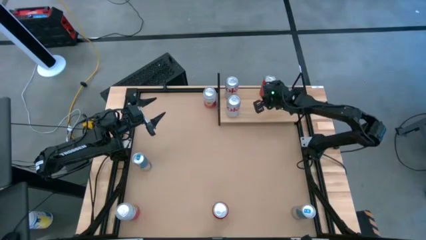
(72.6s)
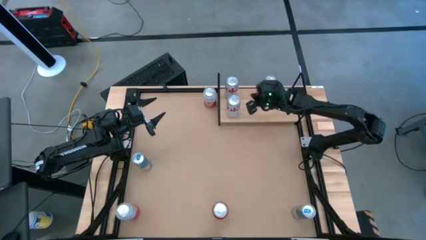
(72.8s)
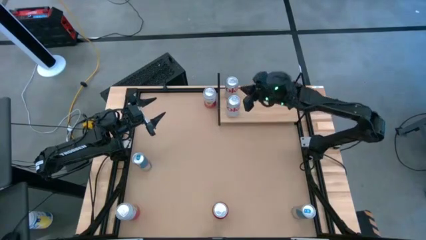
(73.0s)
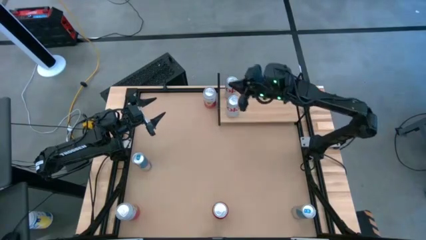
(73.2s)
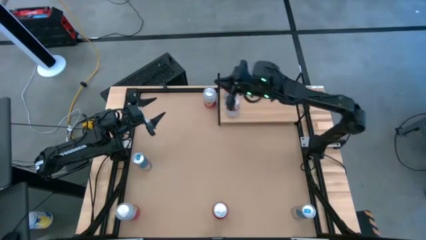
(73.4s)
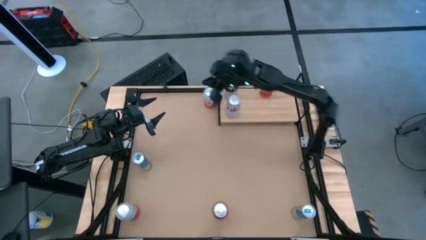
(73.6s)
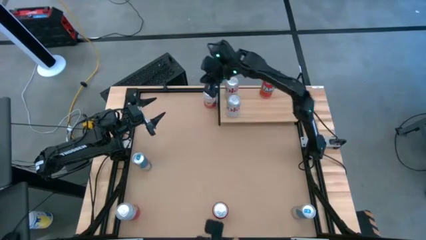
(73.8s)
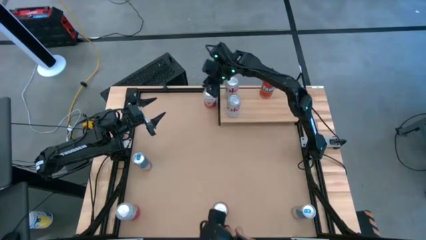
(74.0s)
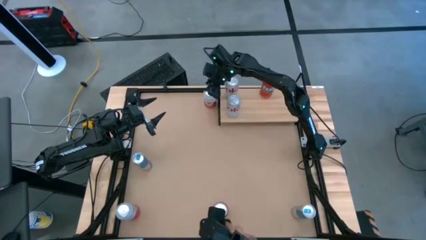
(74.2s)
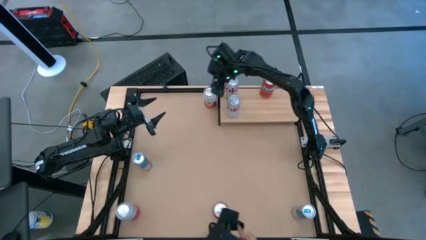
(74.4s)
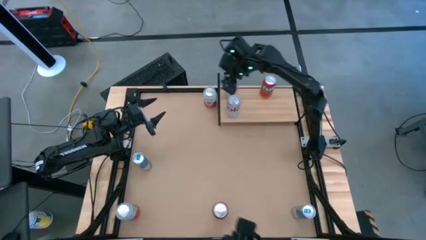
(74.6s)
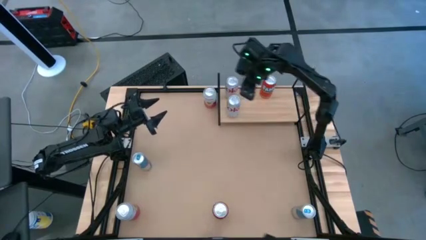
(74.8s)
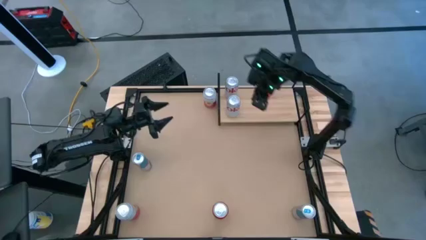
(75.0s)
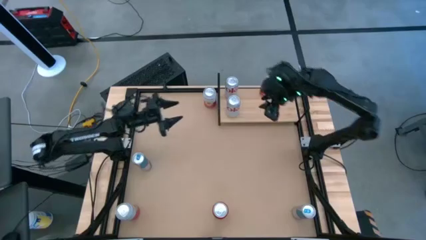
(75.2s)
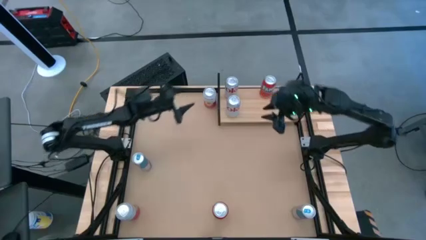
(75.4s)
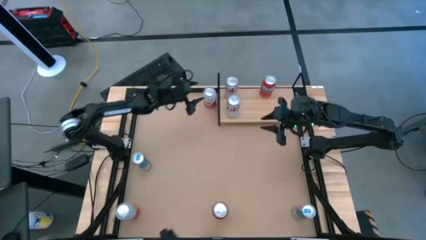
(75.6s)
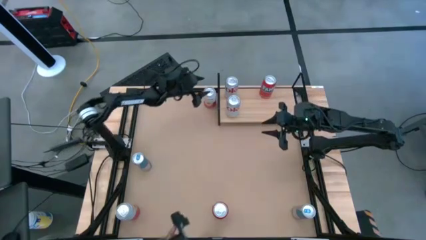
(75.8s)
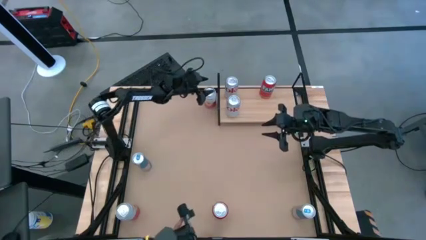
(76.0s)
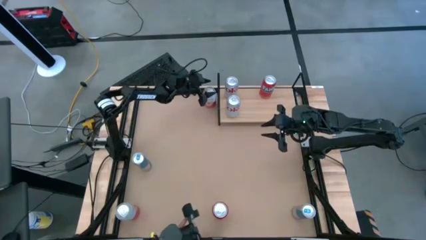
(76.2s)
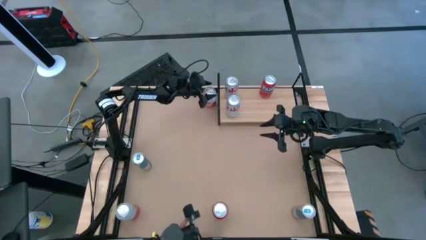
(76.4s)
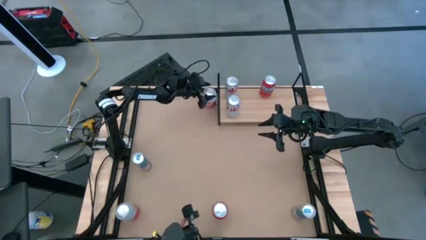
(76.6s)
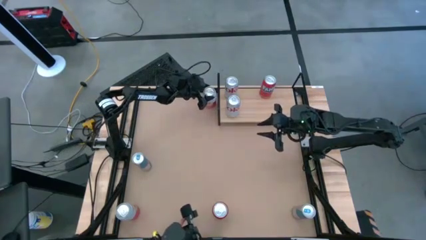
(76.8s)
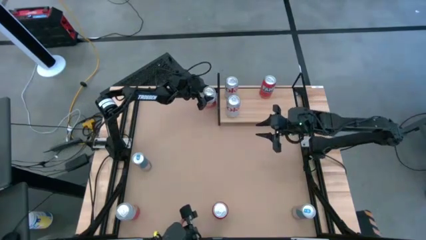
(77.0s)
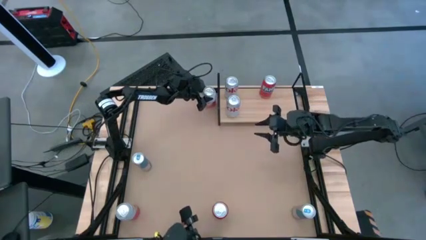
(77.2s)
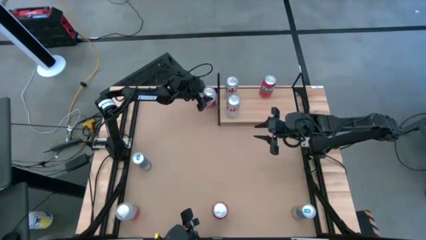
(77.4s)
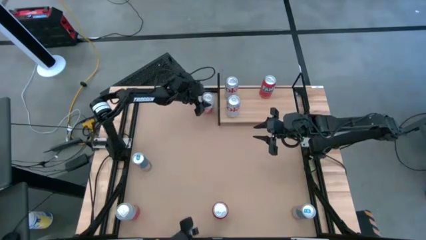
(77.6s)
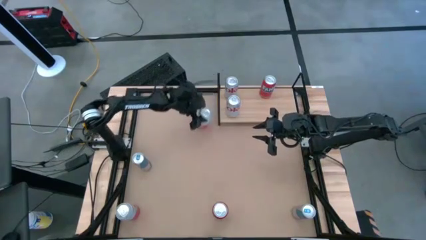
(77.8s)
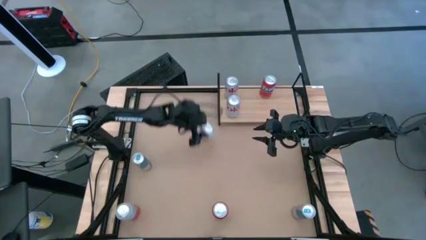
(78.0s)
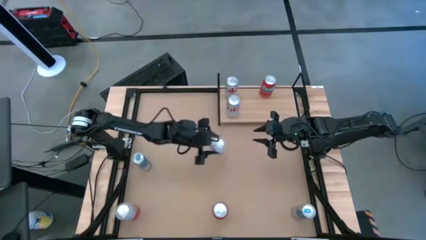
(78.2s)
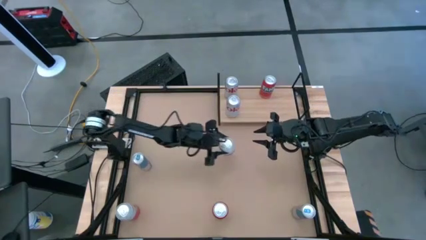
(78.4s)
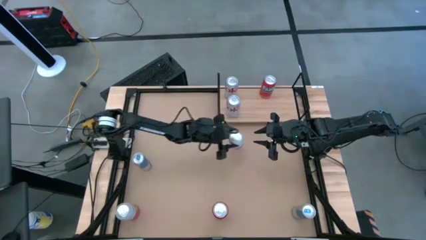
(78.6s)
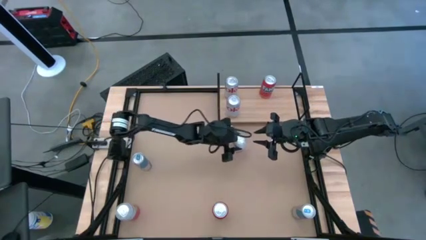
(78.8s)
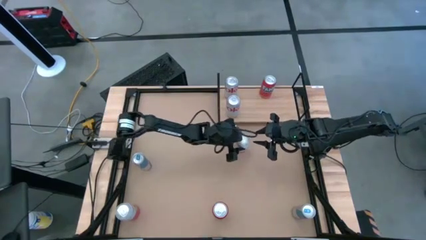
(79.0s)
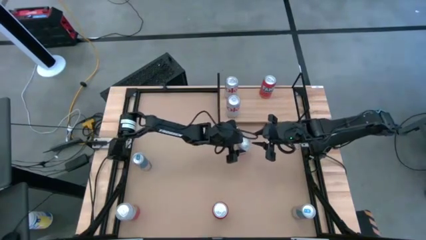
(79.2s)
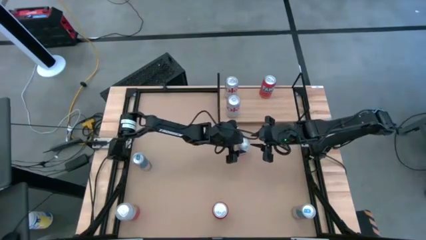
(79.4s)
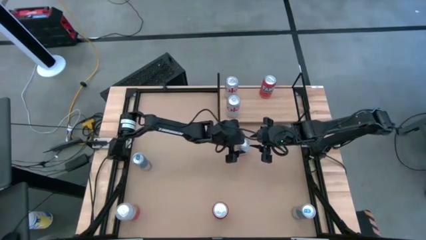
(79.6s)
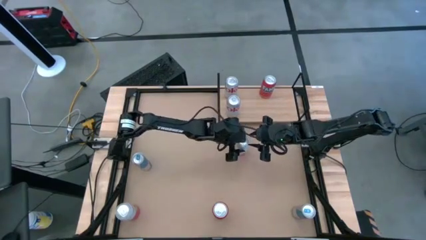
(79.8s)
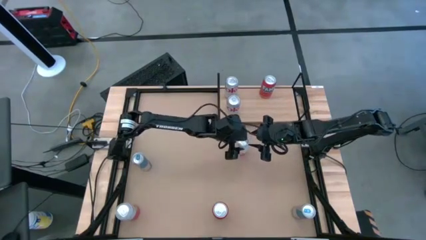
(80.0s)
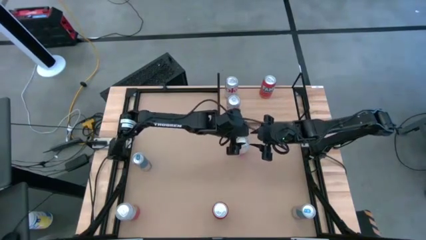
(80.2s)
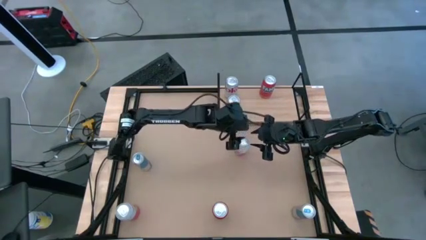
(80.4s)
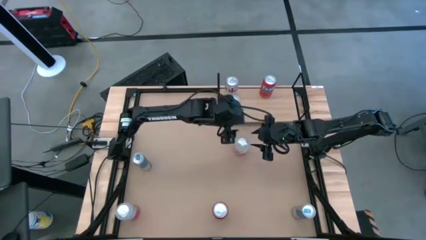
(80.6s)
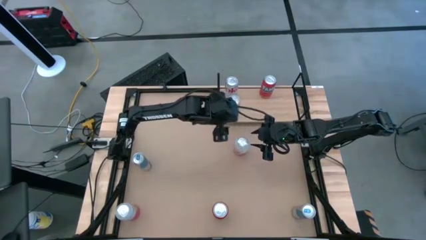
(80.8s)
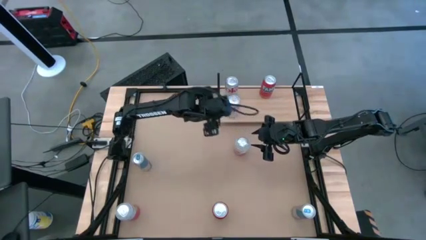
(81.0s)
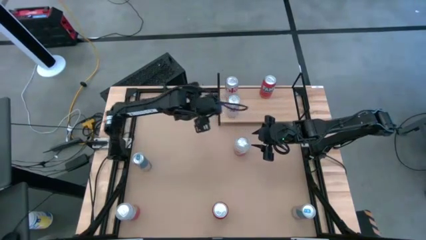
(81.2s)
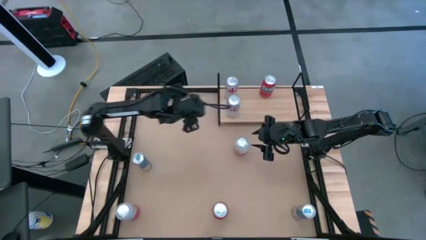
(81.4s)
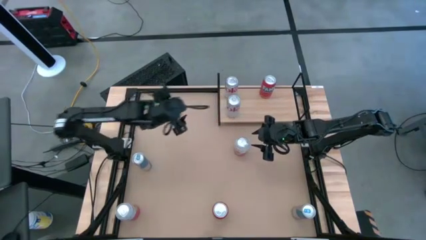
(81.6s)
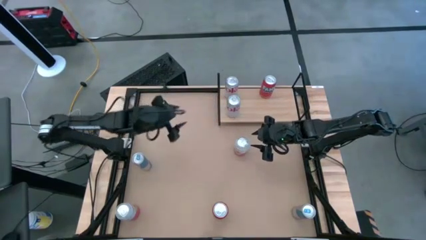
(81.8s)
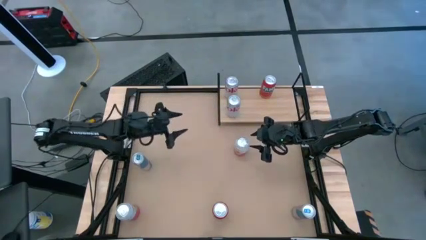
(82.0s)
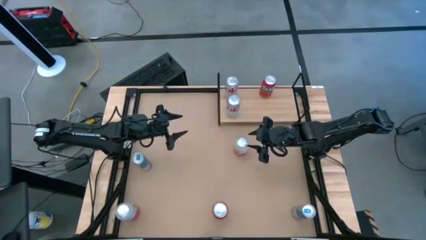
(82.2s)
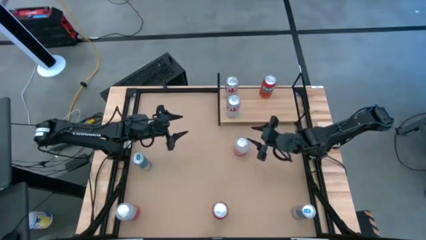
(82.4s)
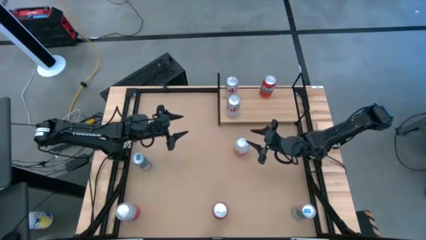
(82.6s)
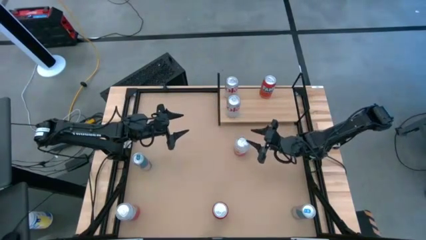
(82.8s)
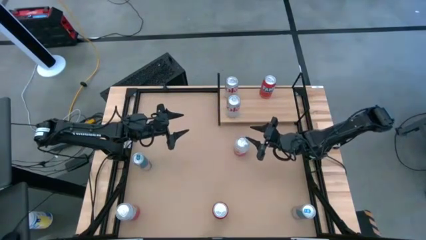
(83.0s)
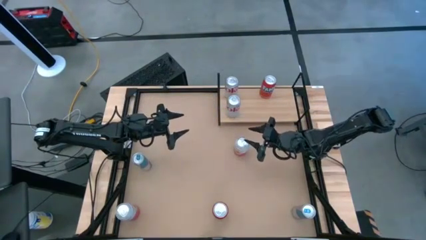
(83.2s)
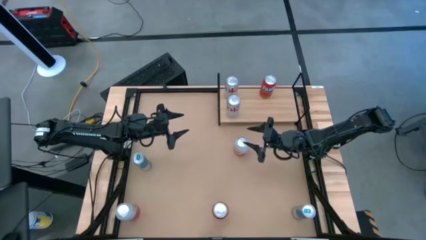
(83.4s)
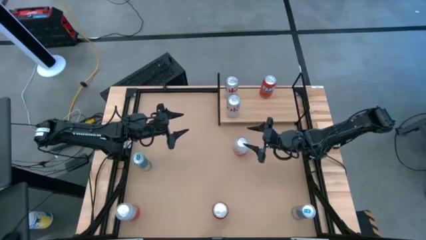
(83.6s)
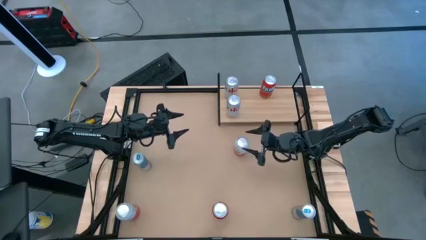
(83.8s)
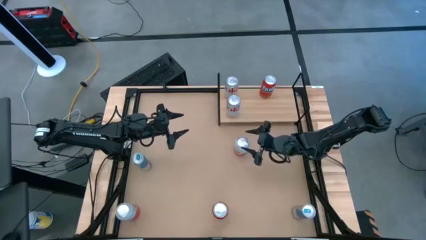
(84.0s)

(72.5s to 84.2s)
Task: Place canned beverage on shelf
Put the top pink-white soda can on the shelf

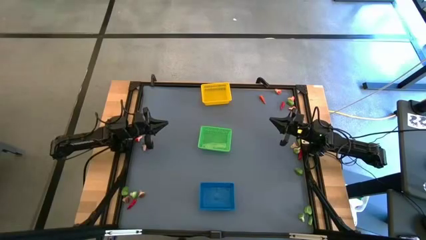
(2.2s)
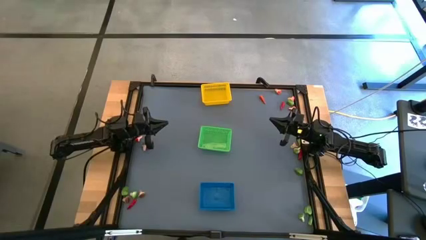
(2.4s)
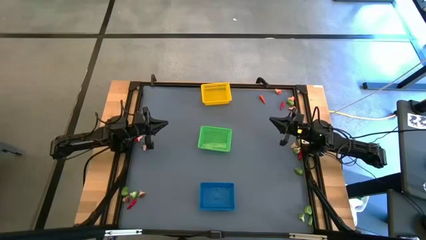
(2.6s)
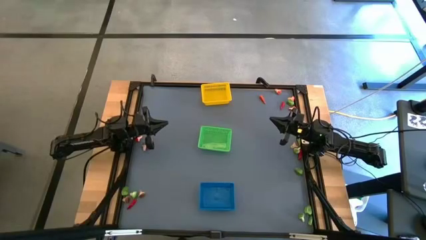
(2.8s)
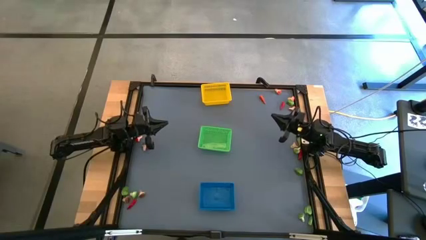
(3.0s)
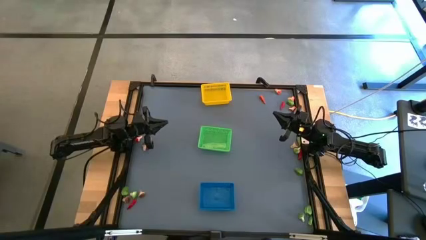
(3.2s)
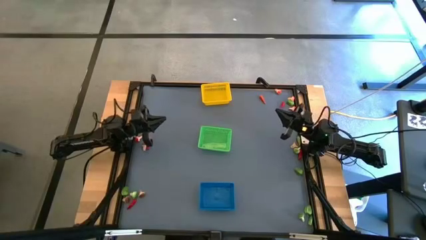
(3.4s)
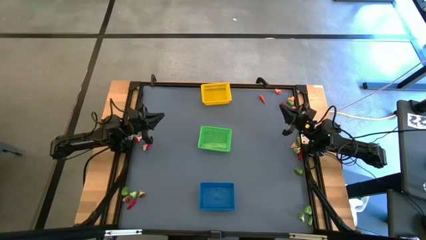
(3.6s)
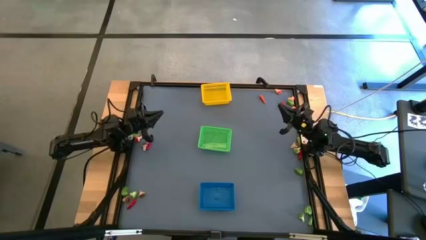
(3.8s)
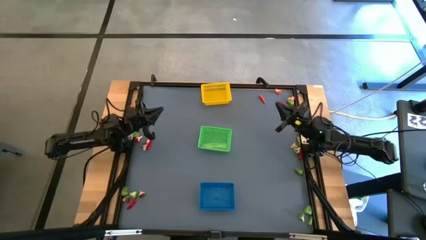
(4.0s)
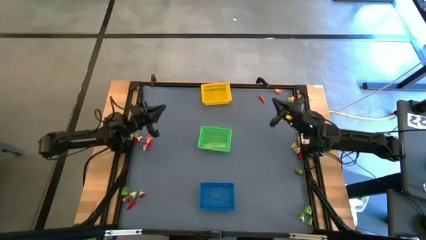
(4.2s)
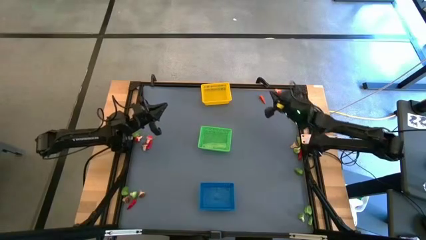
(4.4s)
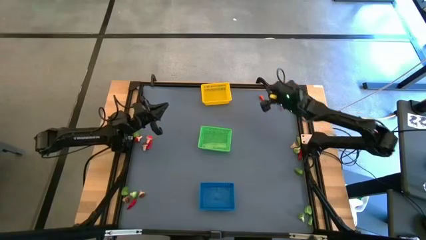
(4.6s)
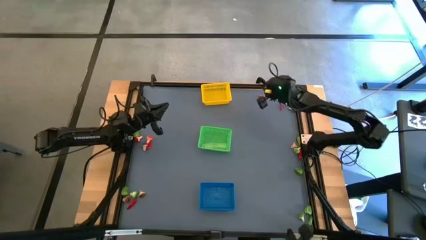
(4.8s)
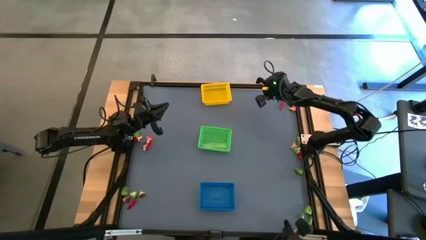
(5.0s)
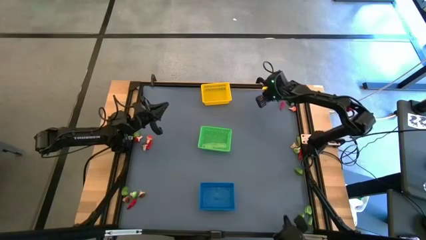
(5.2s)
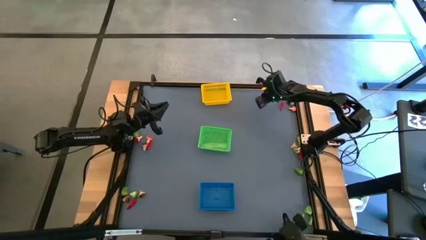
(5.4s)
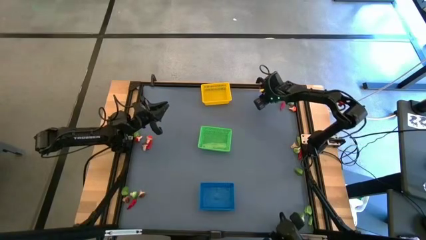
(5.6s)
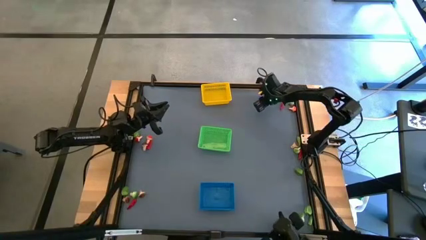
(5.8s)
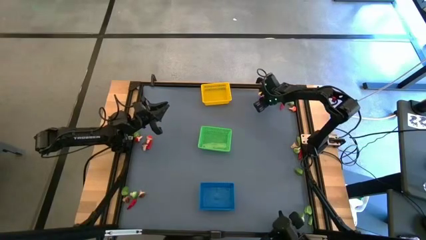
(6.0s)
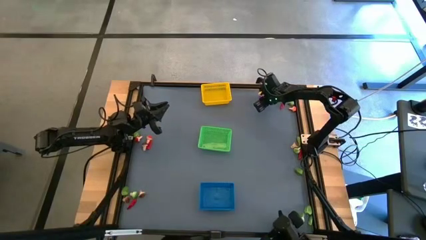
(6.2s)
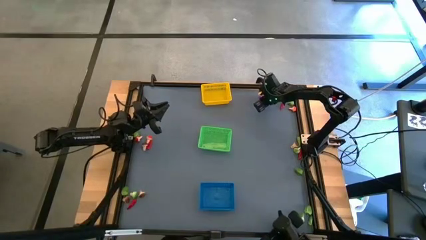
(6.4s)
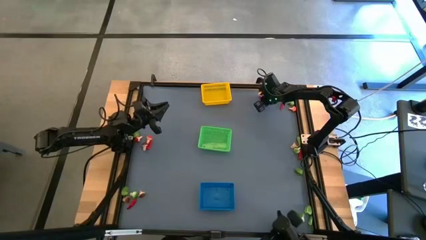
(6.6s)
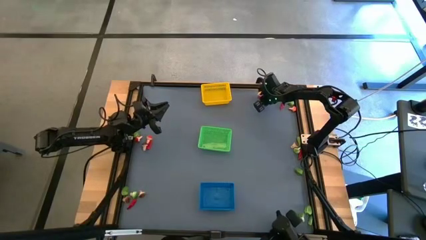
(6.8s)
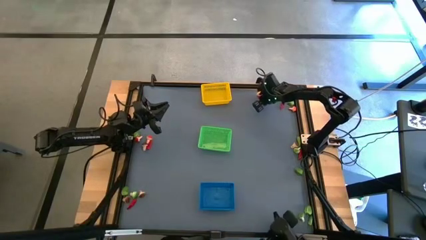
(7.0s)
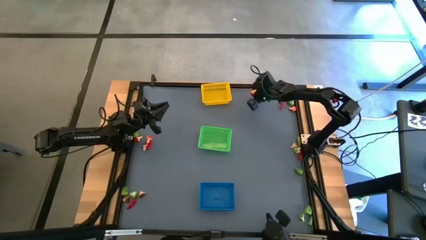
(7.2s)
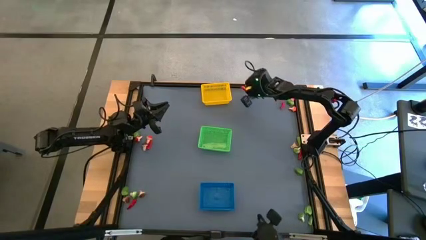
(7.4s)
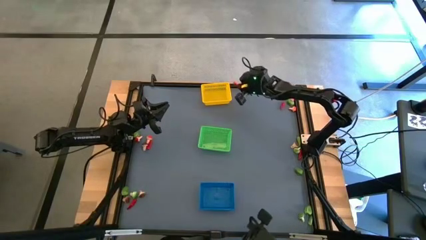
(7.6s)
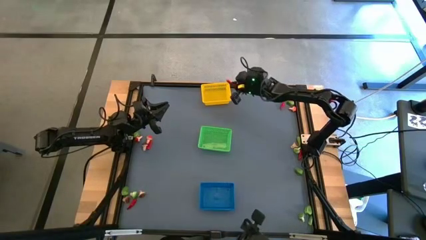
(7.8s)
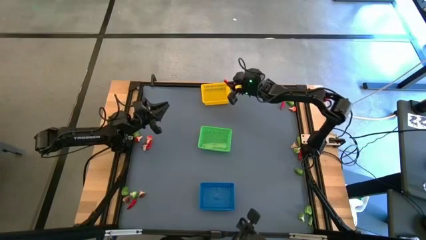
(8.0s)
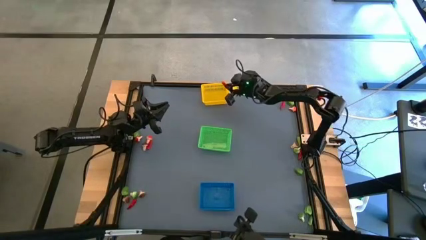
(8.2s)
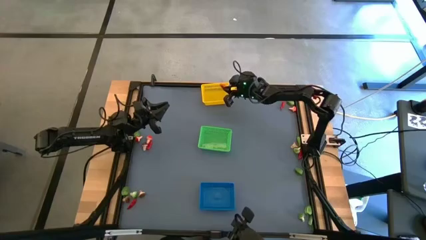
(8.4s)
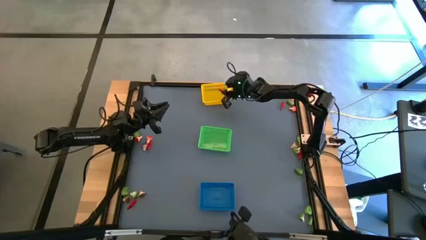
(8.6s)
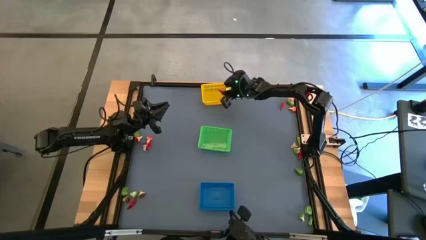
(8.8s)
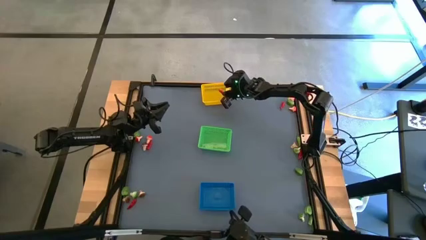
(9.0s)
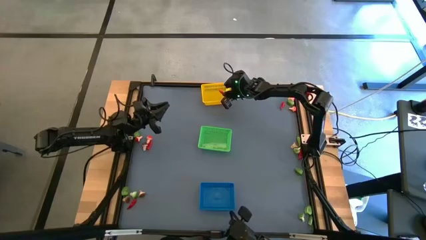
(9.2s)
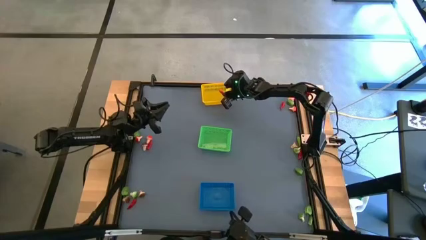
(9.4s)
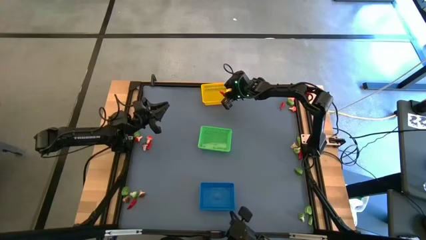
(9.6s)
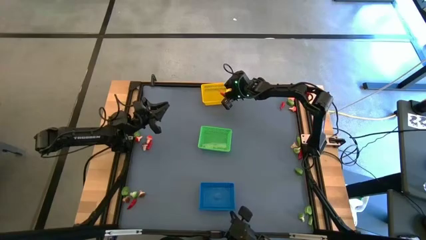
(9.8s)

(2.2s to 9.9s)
Task: Sort produce into baskets
Put the orange chili pepper into the yellow bin
